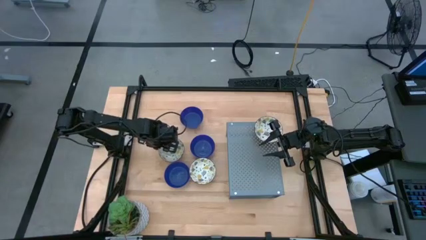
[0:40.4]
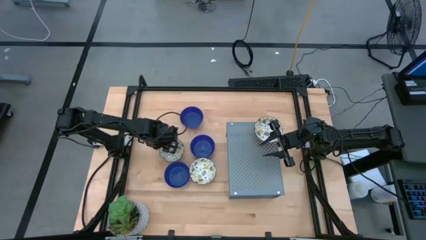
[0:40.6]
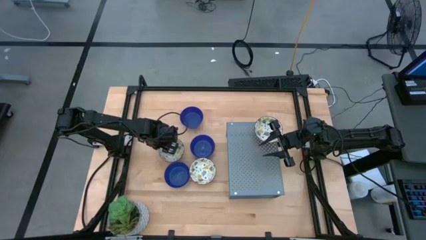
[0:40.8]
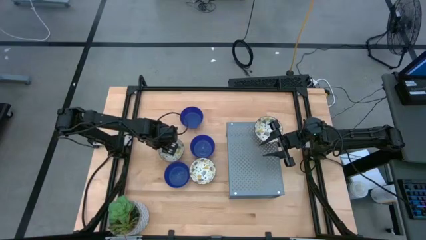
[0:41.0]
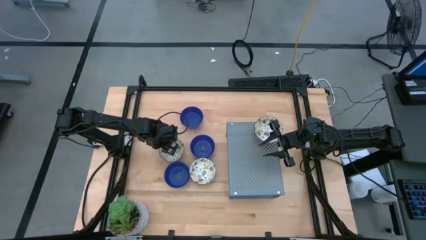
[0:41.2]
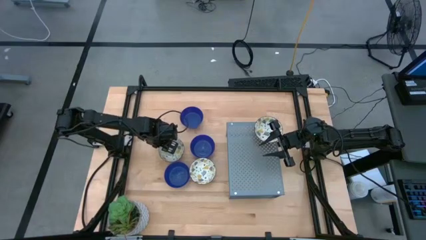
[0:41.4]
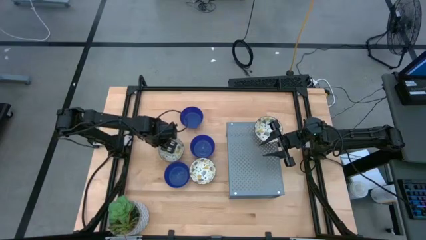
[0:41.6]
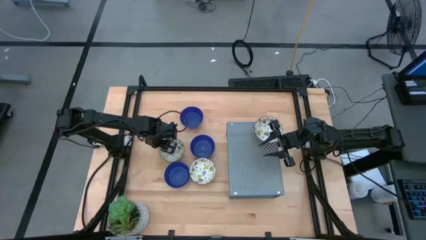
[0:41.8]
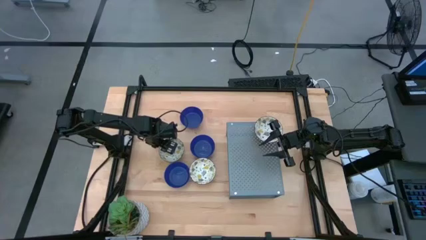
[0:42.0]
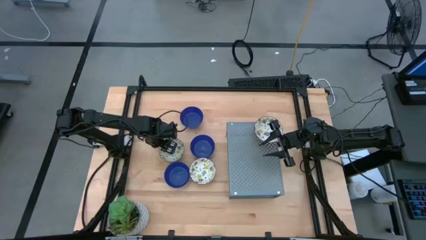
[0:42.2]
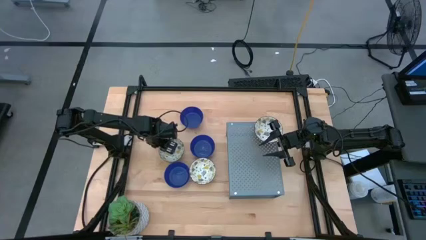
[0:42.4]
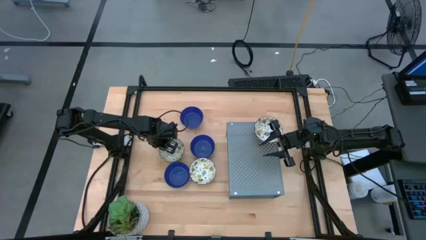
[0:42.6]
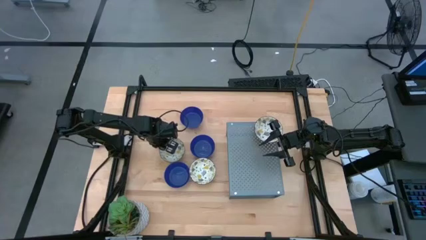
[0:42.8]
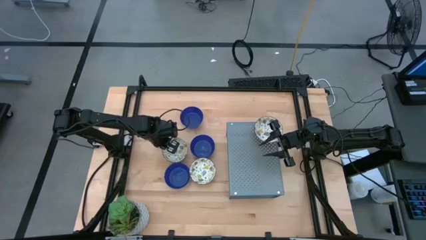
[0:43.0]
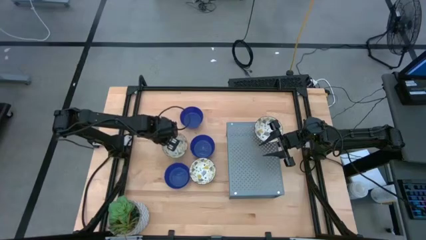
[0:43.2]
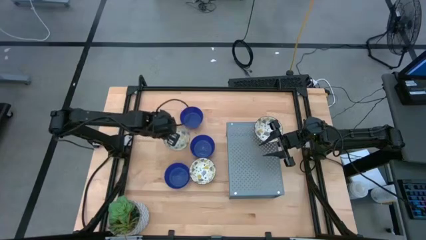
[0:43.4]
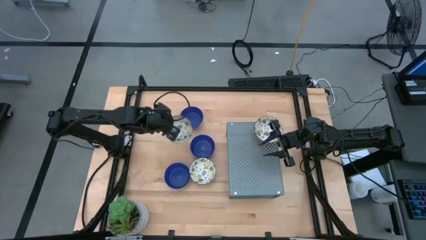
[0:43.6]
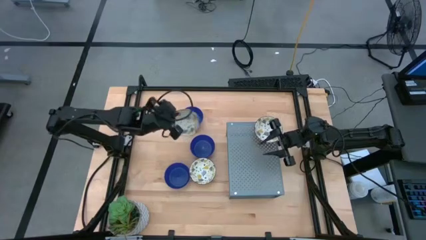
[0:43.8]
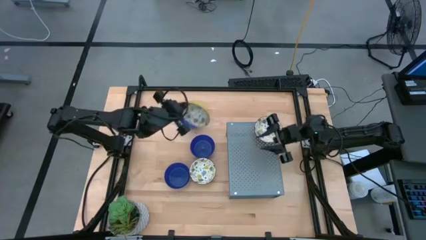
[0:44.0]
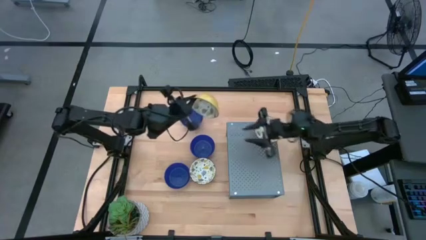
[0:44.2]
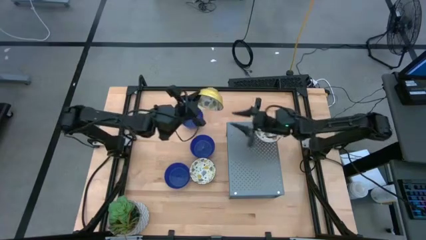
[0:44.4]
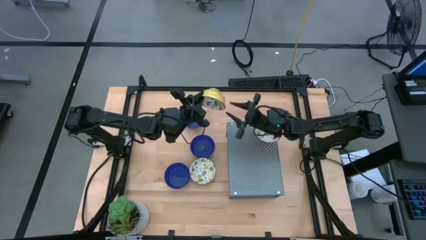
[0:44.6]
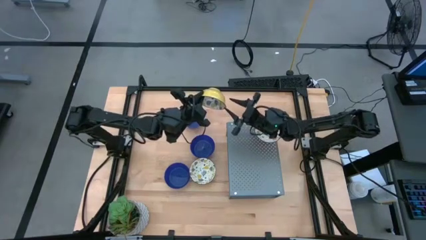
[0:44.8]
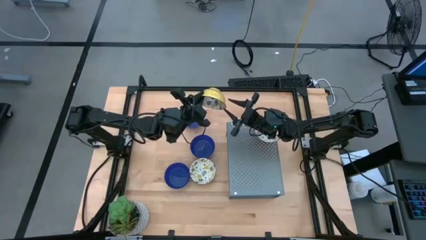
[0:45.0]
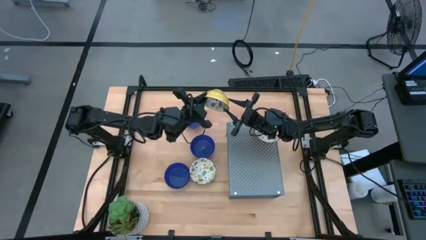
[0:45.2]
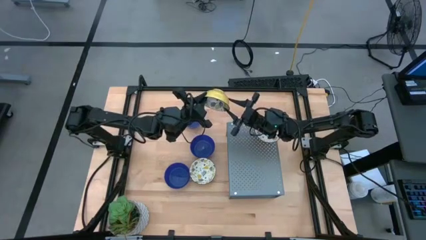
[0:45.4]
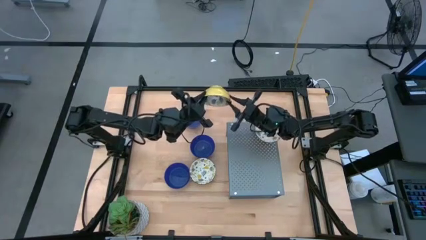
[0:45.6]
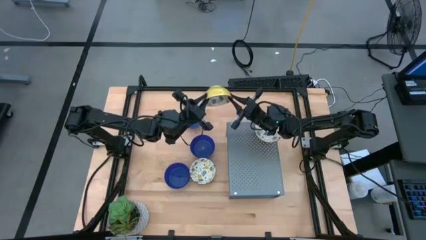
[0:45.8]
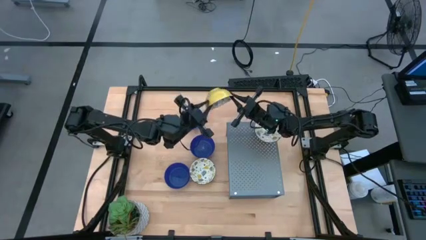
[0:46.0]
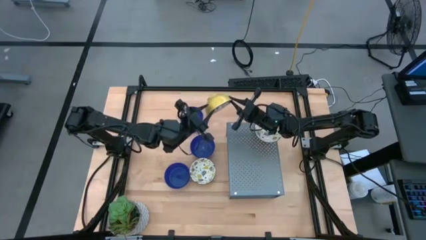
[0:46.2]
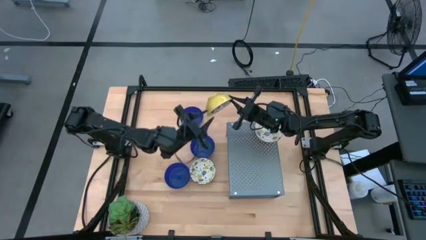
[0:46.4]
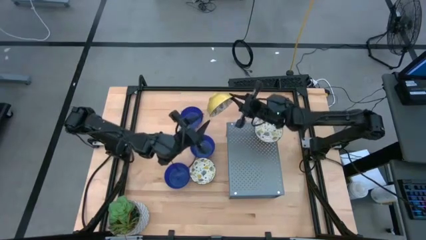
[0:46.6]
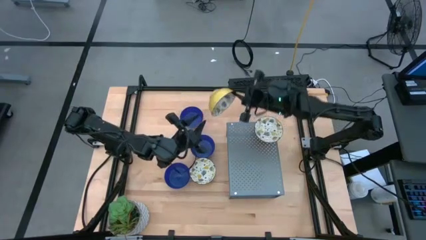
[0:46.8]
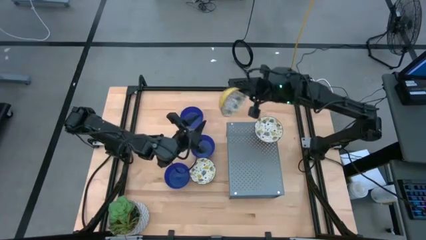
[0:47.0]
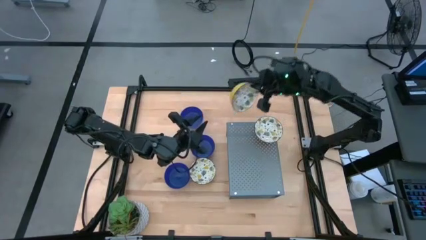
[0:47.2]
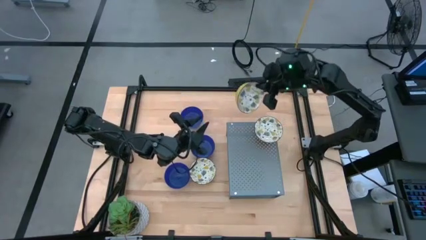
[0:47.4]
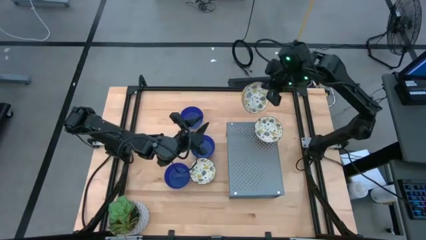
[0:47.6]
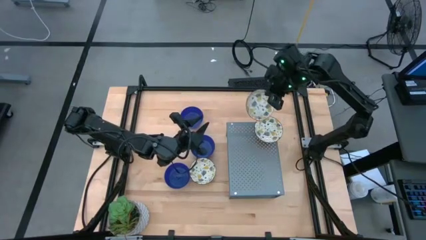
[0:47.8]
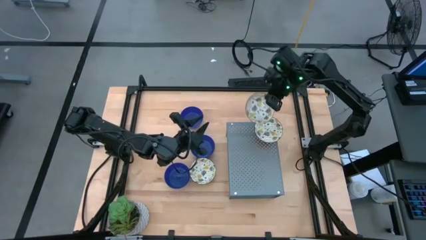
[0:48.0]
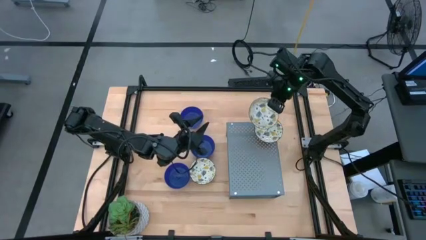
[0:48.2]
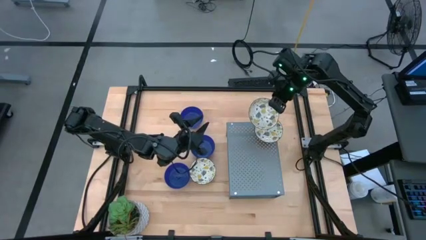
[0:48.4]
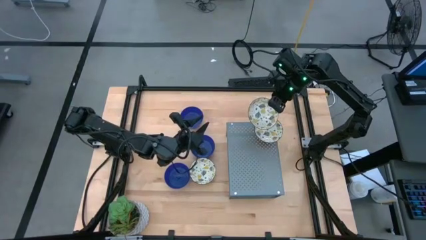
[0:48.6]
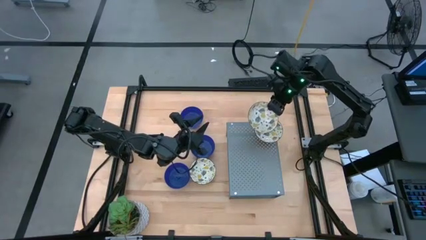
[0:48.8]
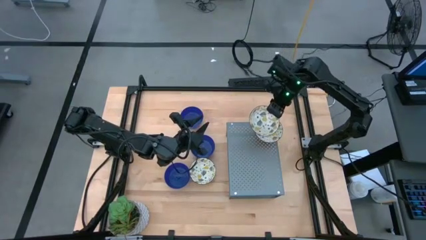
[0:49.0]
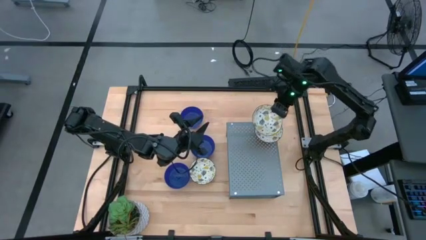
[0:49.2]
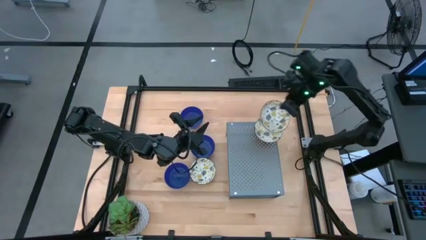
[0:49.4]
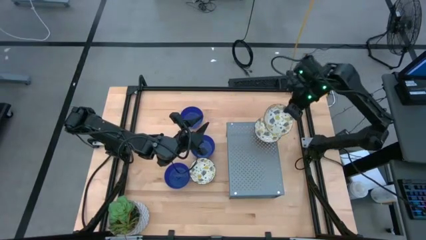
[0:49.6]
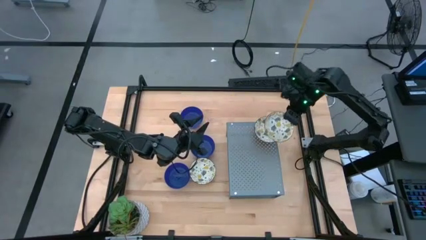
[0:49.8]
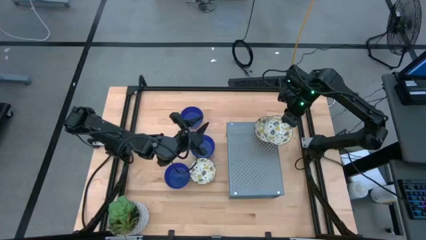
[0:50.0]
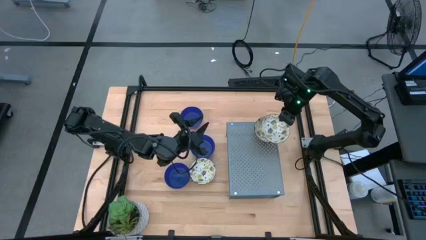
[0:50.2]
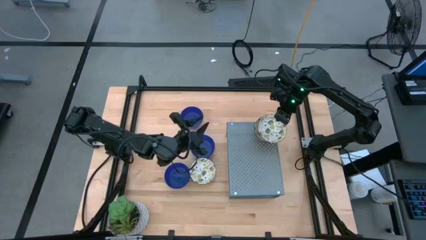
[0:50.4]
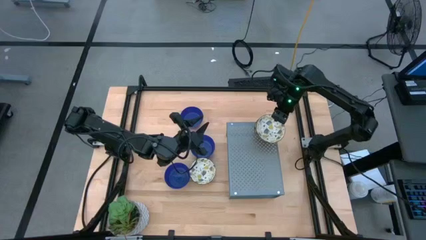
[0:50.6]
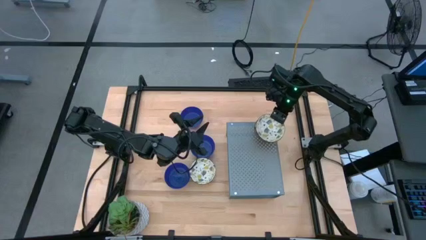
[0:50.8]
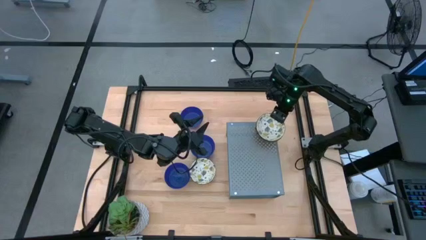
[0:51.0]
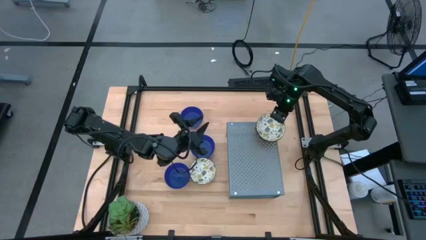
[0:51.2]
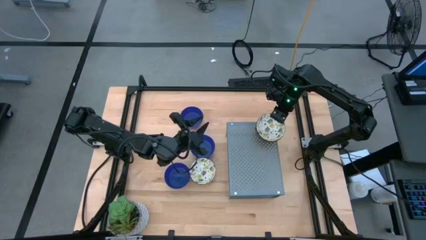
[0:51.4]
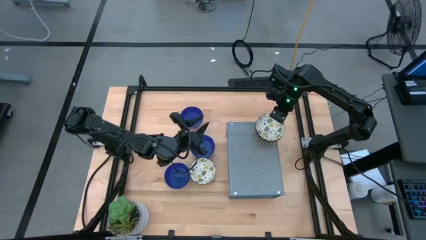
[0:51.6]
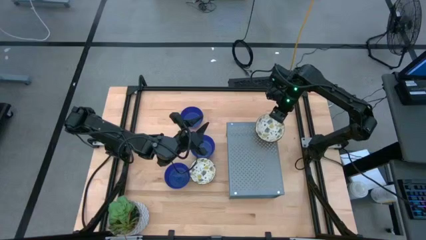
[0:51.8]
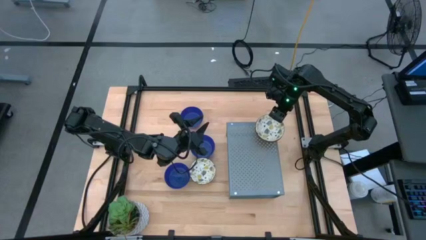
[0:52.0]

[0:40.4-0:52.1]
Task: Pick & Place Mini bowls
Stack the left yellow bowl on the yellow bowl on the shelf

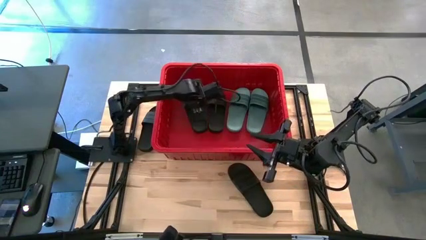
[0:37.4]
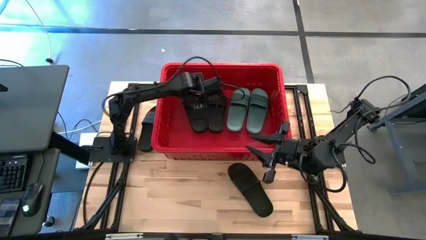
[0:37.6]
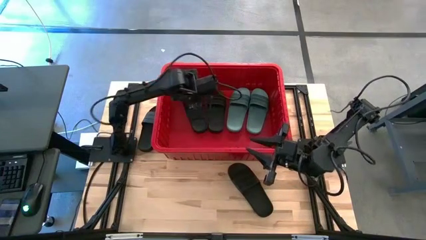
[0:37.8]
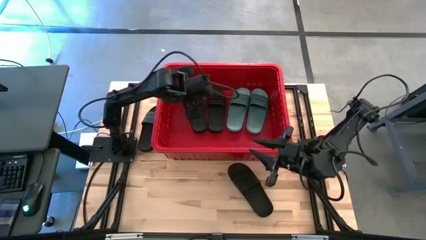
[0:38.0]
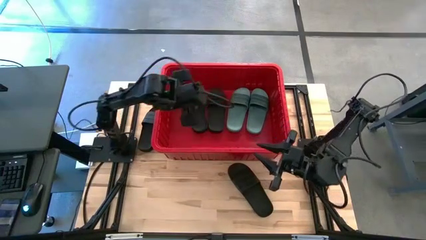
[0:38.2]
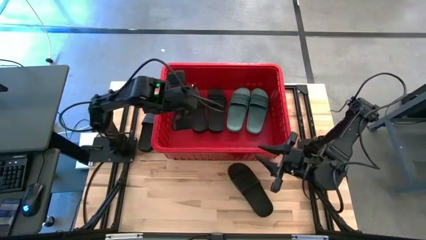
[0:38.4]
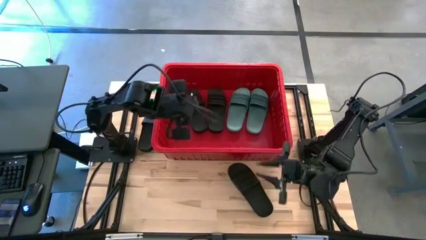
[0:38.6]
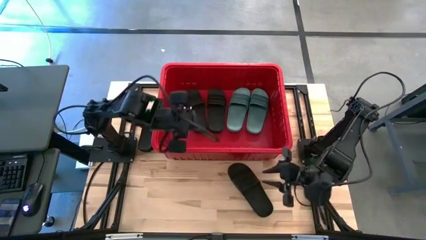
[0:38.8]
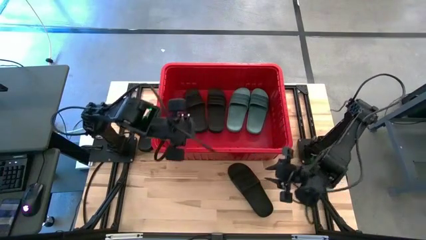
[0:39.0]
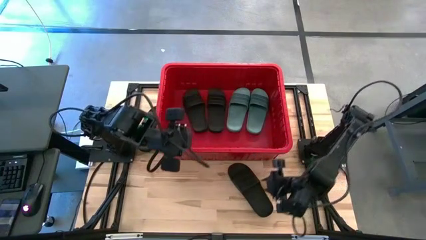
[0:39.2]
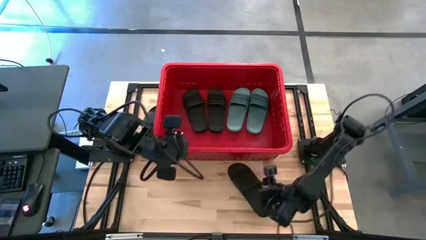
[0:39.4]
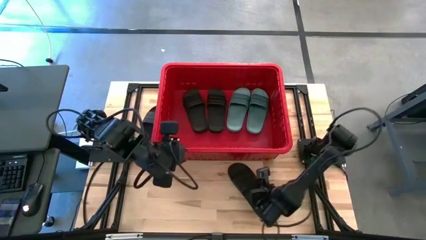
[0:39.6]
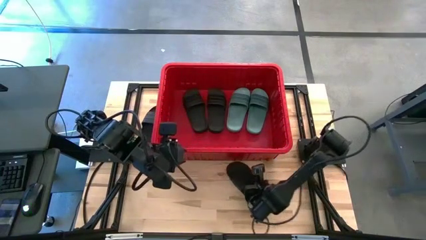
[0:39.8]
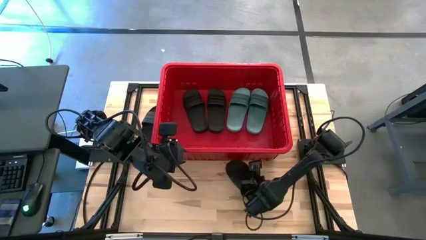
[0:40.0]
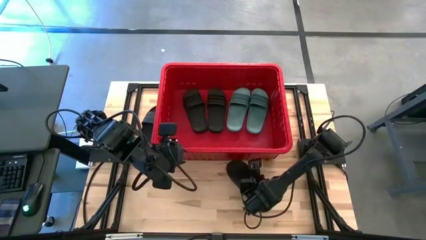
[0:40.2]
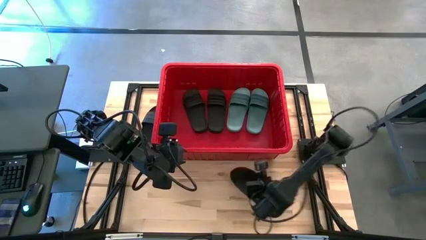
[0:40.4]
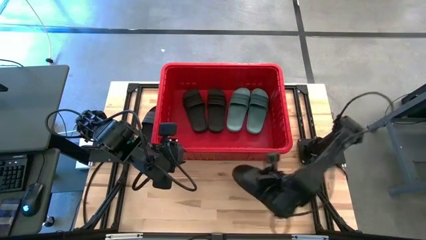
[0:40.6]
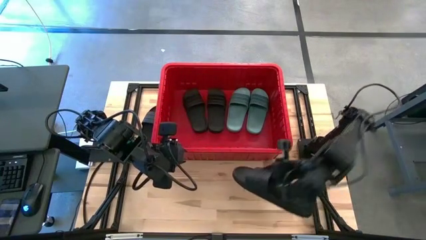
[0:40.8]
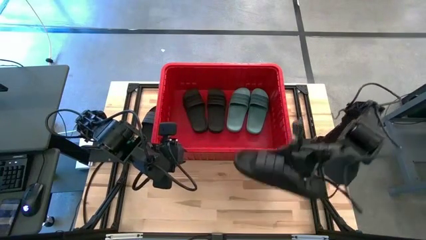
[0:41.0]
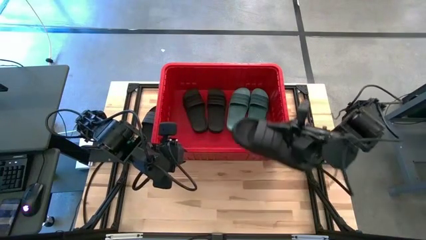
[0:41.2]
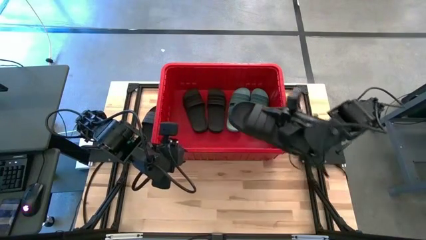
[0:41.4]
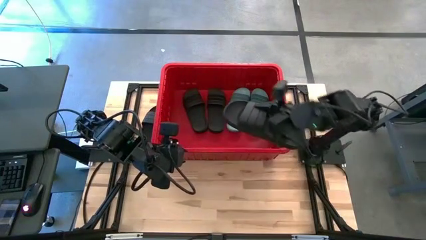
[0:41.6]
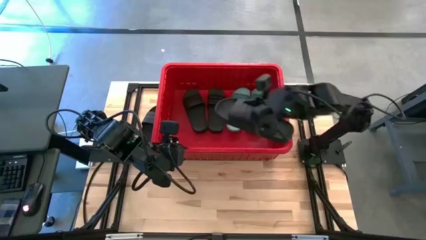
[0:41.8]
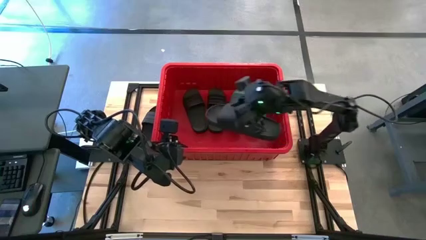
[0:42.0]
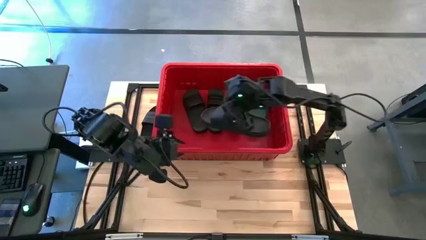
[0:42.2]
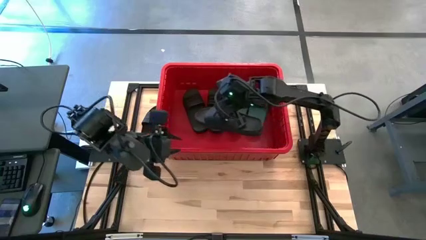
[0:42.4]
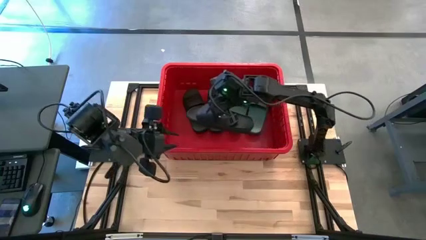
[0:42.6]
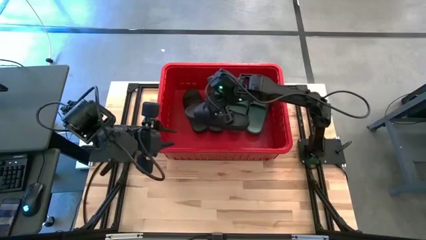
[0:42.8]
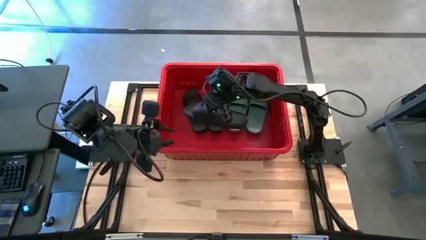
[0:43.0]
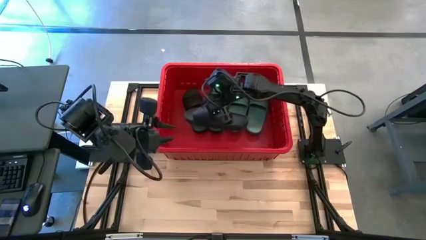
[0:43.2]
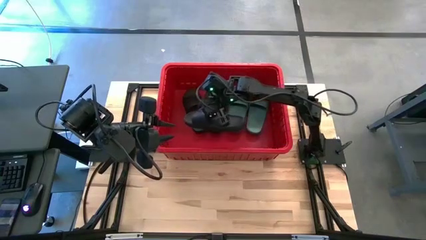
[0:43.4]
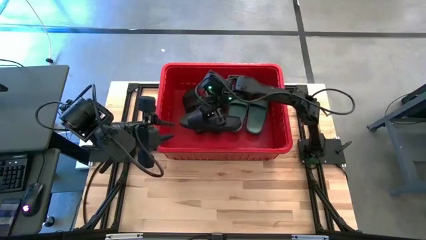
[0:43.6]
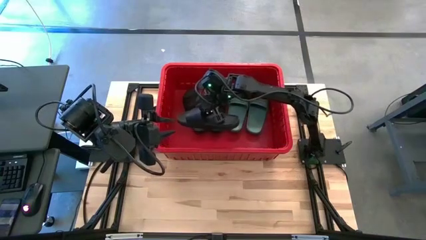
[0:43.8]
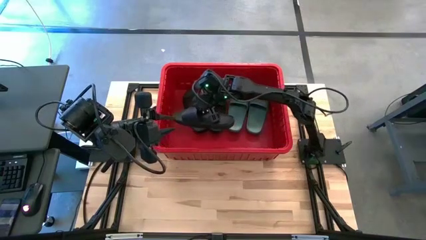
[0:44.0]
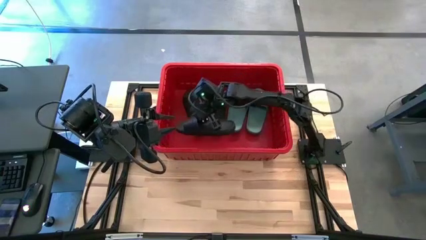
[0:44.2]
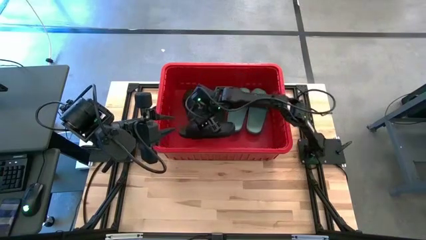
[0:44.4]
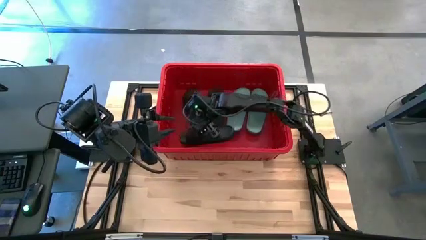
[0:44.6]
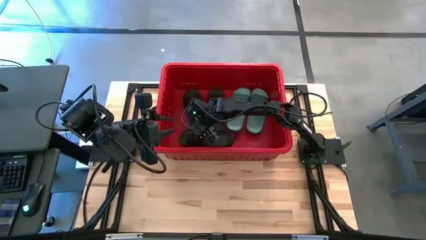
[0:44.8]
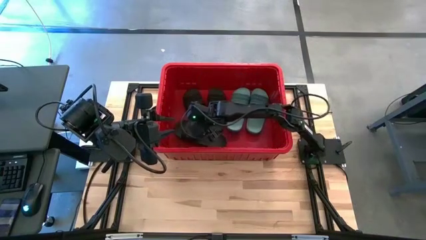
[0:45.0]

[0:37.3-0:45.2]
Task: Pick and place slides into bin
Put the black slide into the red container
